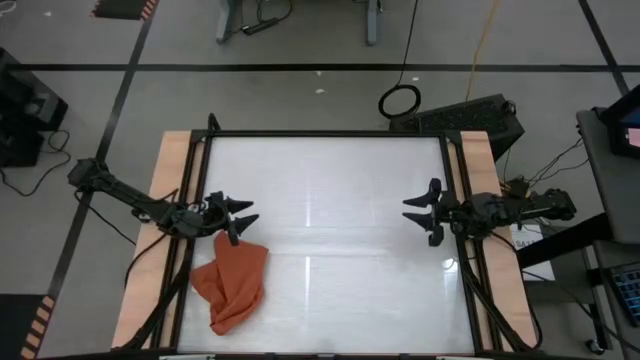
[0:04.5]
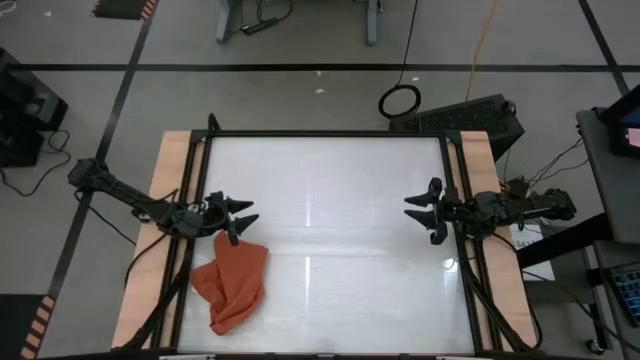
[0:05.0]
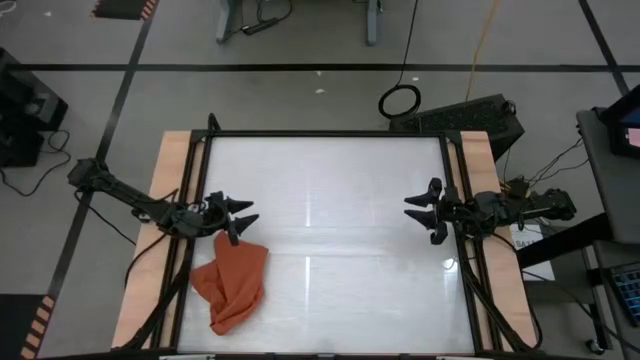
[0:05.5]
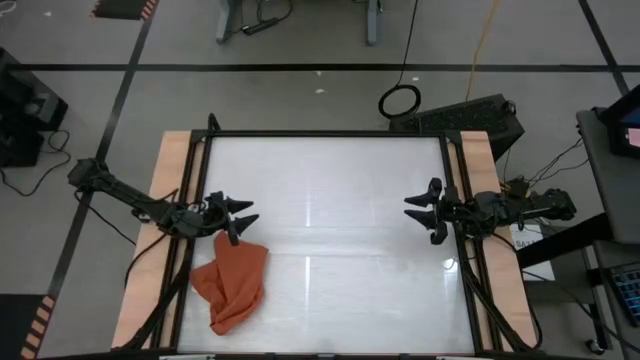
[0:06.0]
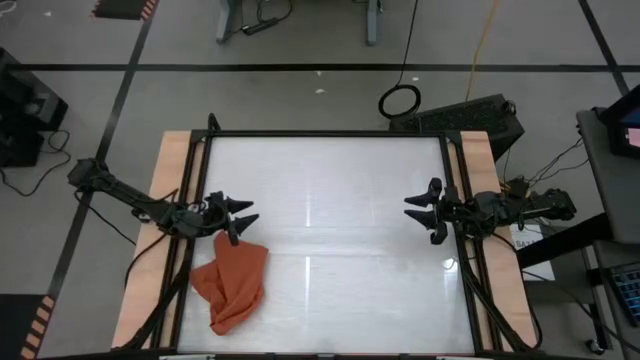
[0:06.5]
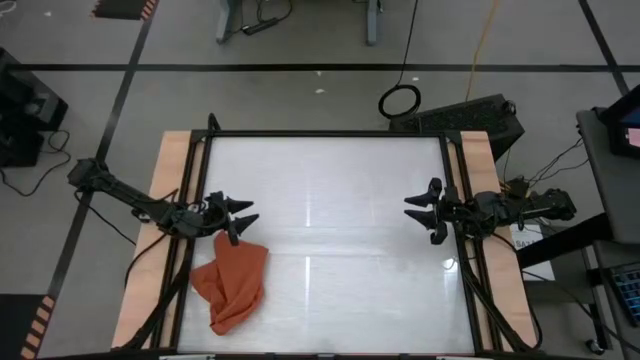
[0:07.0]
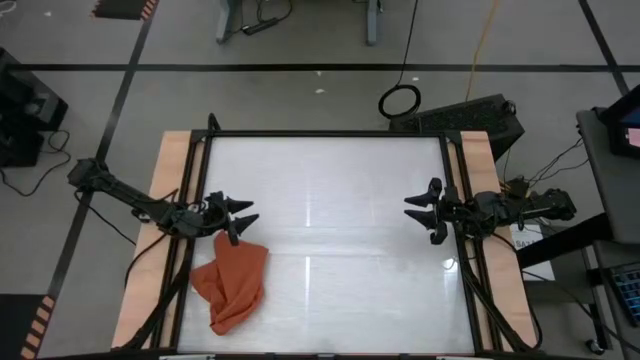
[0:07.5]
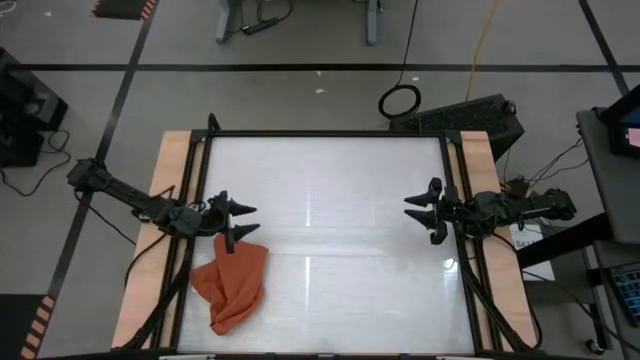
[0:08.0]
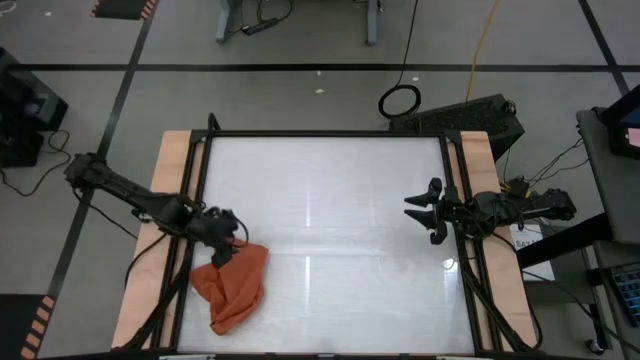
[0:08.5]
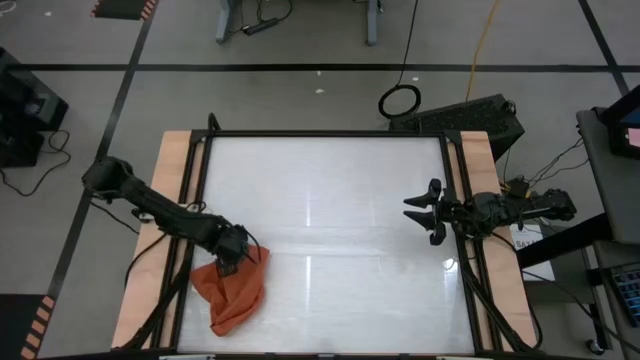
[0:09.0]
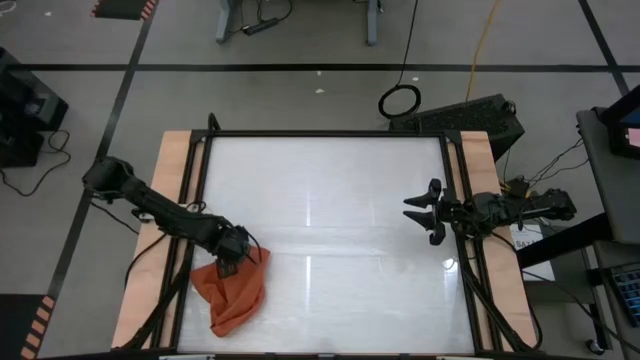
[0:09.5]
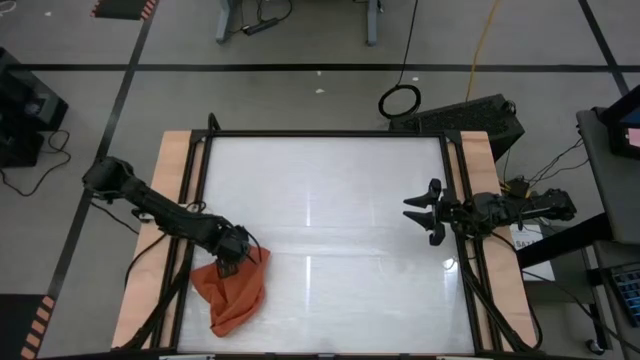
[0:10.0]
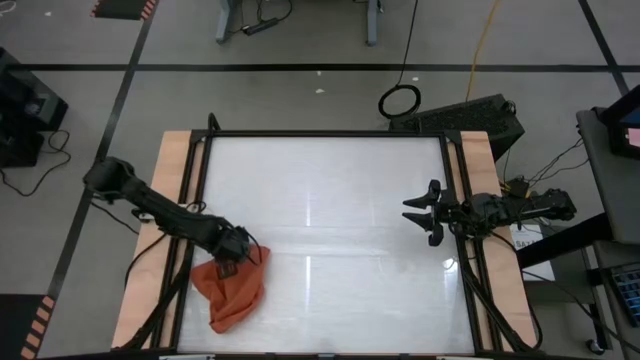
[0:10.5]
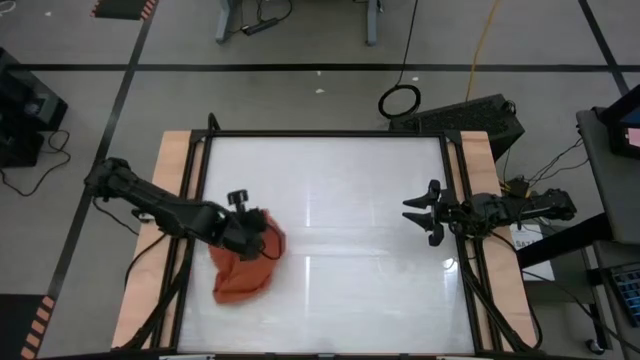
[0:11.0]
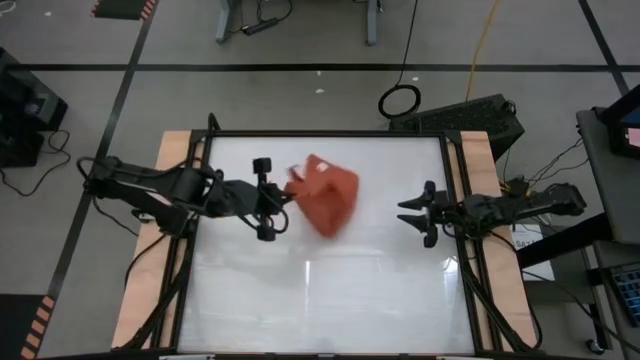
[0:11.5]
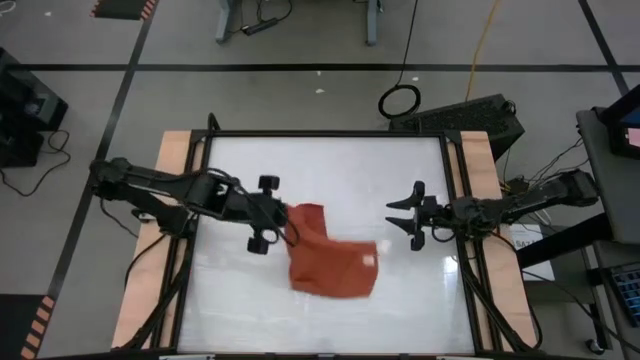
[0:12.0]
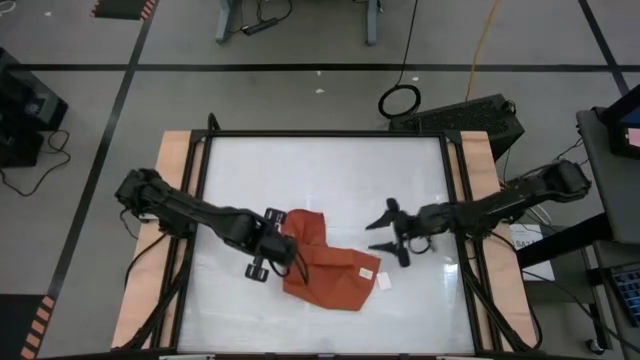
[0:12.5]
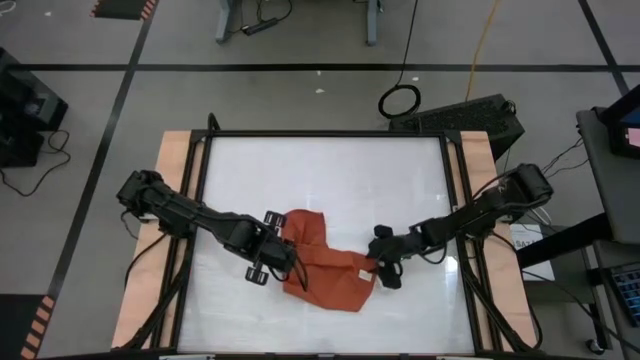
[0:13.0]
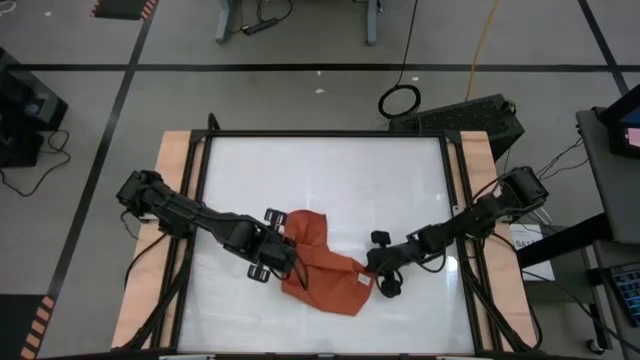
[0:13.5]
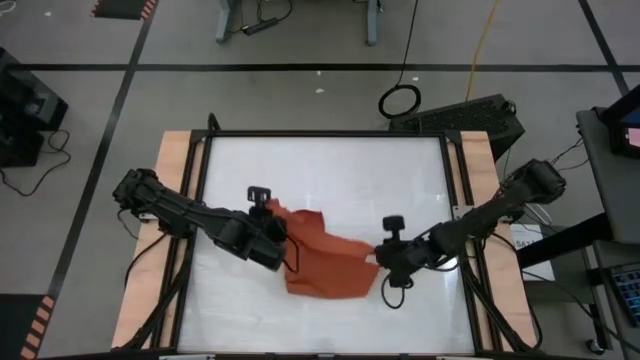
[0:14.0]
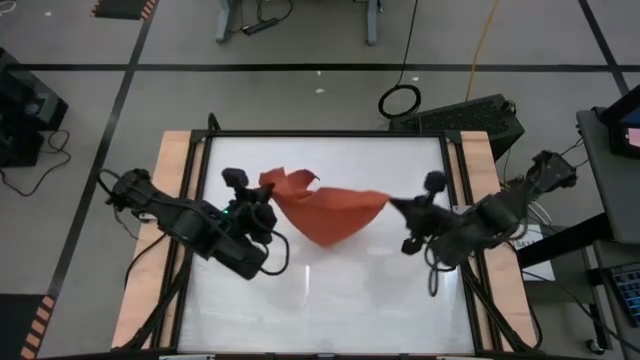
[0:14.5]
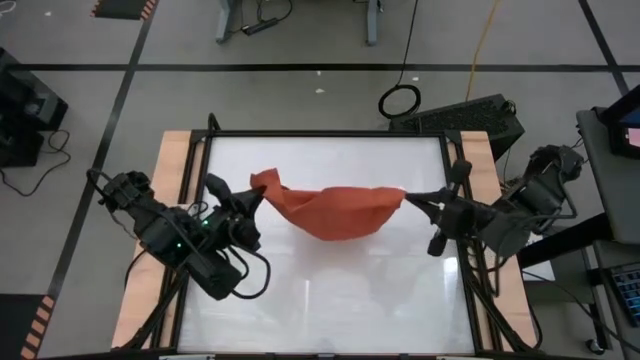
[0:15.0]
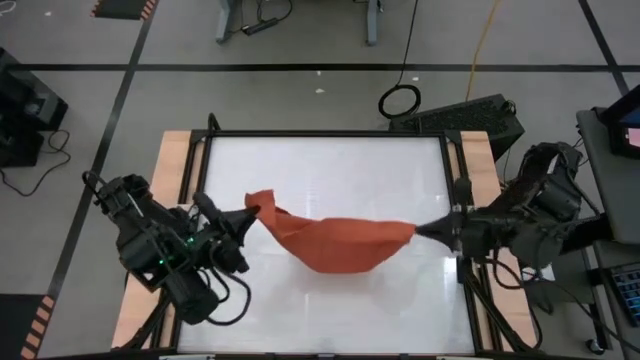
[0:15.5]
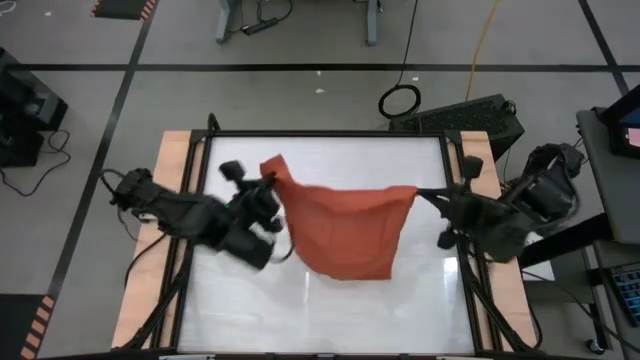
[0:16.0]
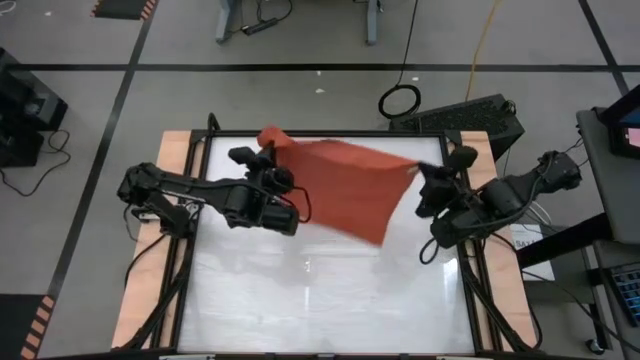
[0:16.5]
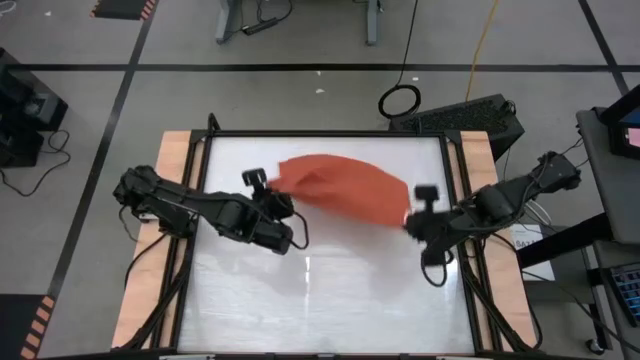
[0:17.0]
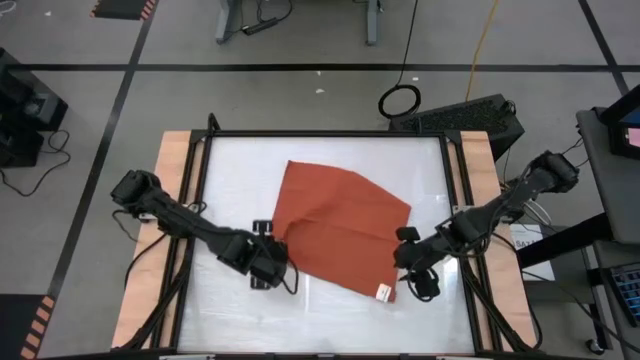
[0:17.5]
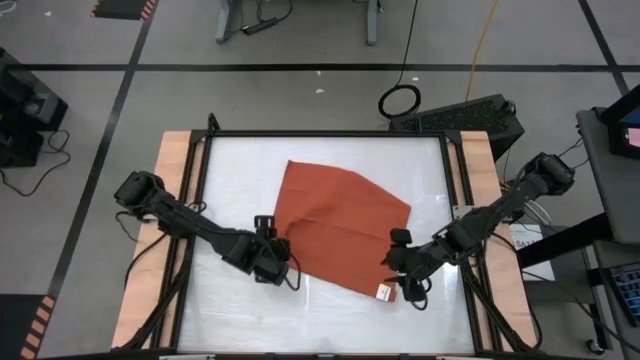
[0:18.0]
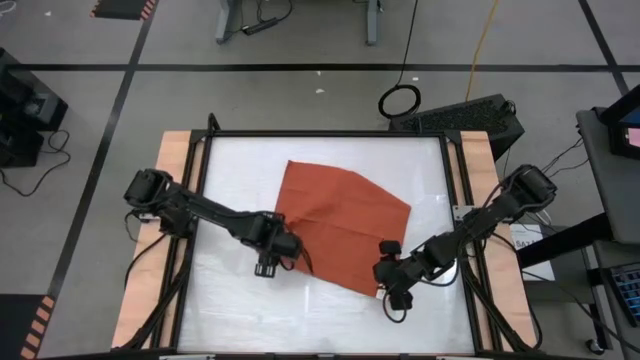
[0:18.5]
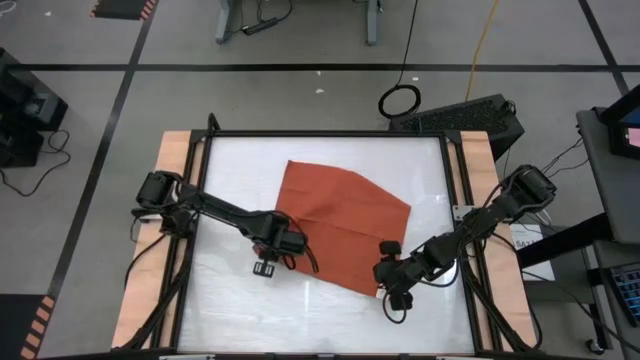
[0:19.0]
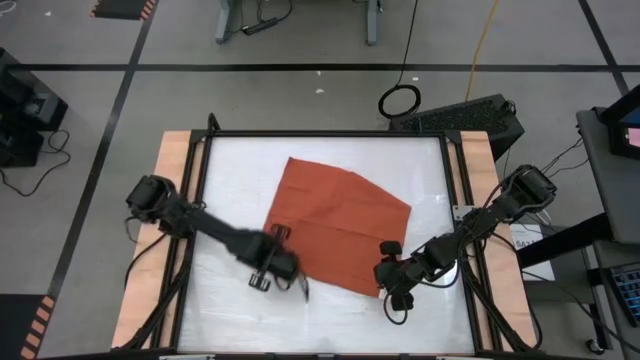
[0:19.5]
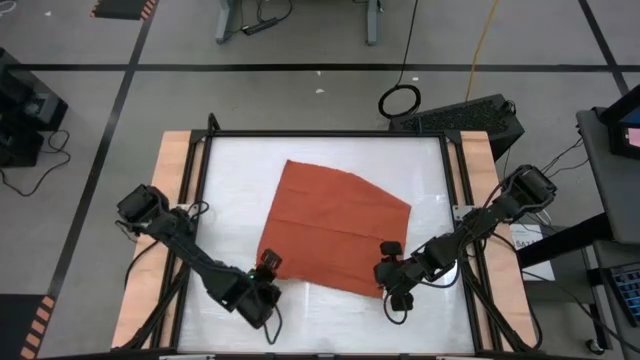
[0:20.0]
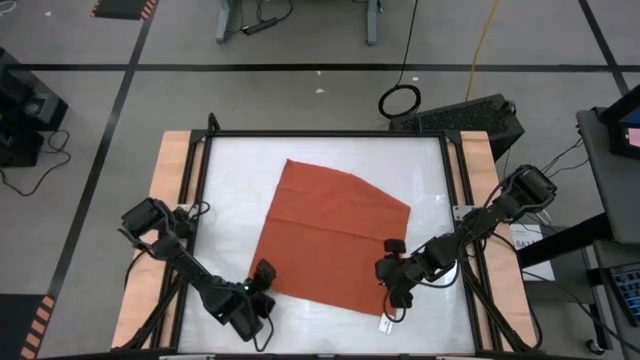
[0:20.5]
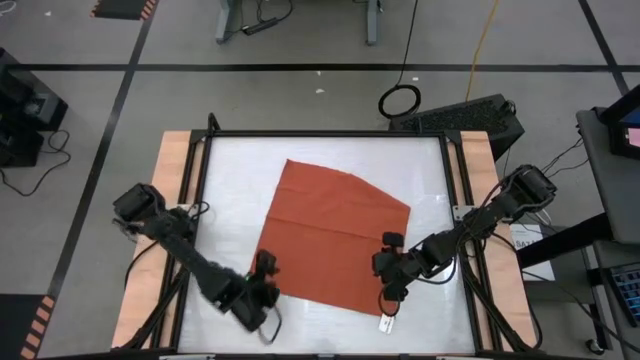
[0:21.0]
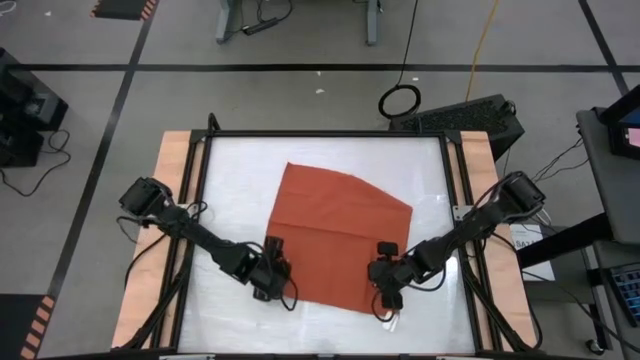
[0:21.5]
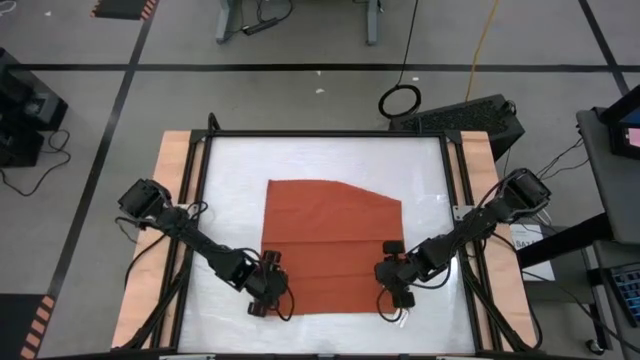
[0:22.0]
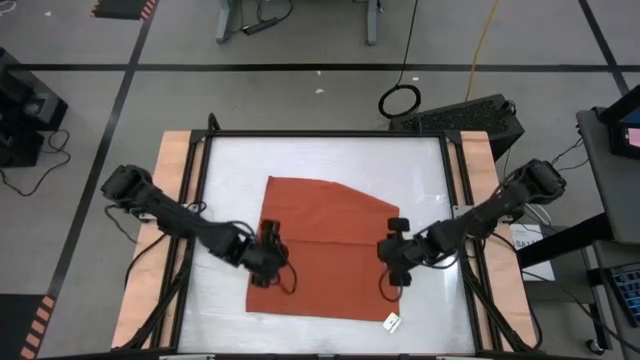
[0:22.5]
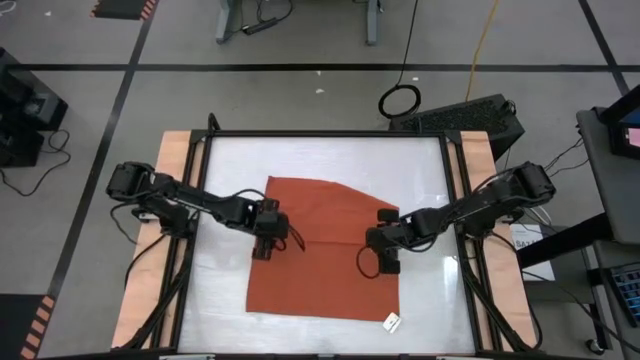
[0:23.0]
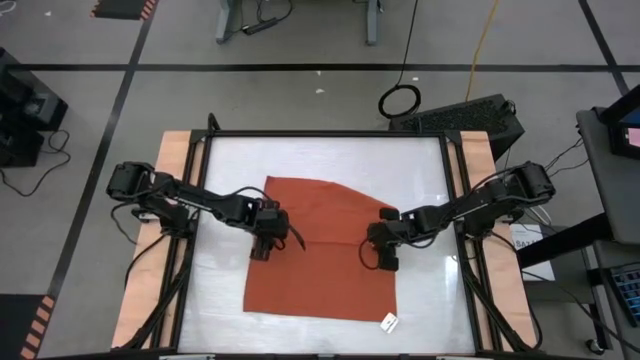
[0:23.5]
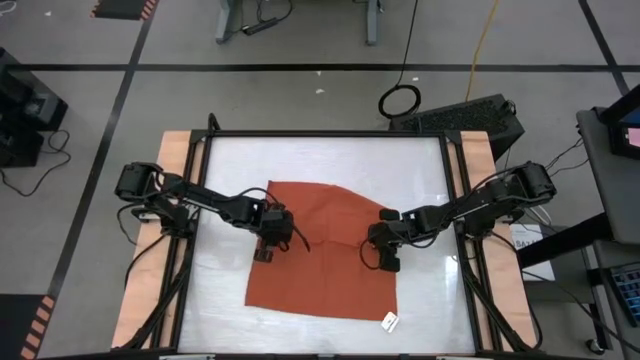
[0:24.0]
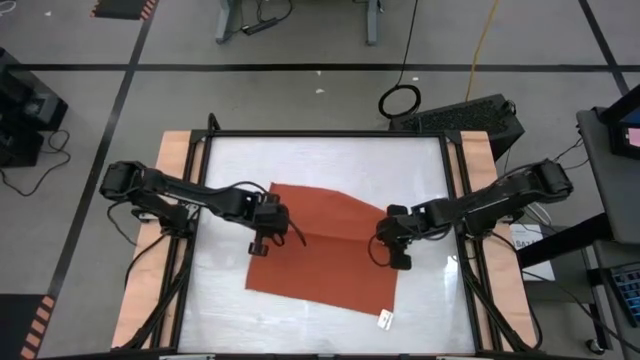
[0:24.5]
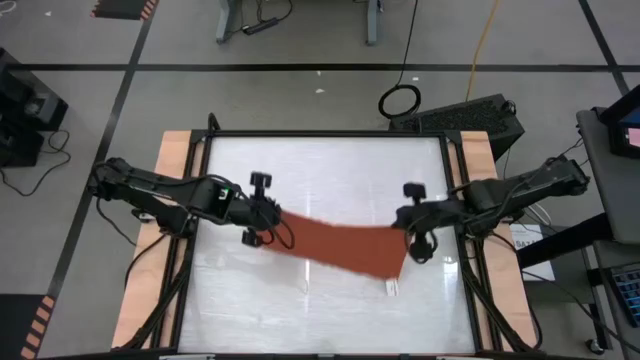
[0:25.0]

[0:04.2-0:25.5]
Task: Roll towel
Roll the orange towel
